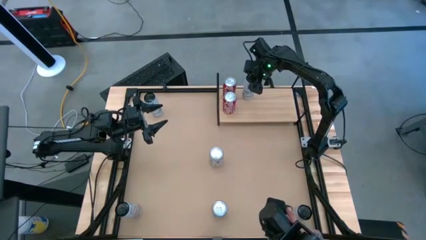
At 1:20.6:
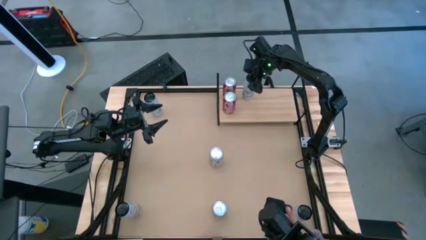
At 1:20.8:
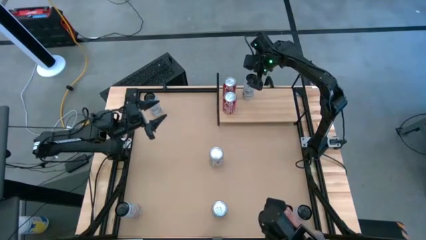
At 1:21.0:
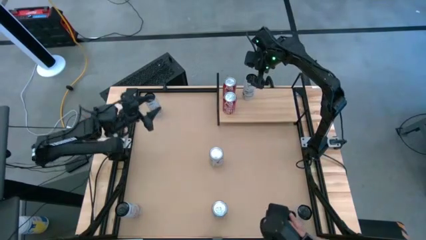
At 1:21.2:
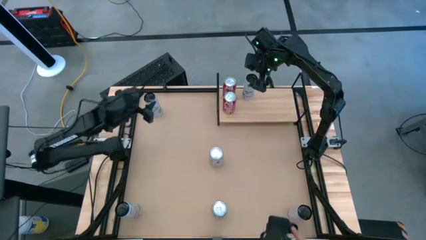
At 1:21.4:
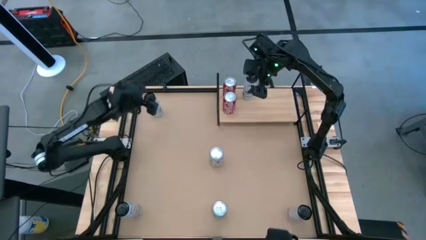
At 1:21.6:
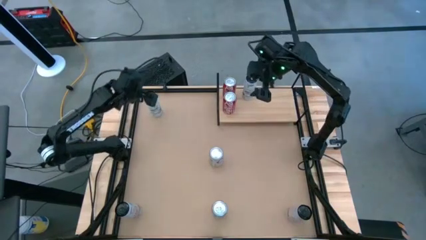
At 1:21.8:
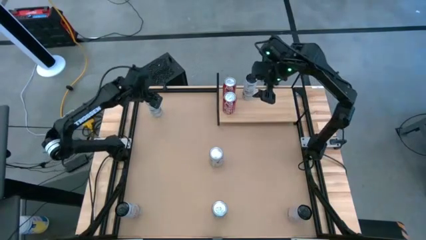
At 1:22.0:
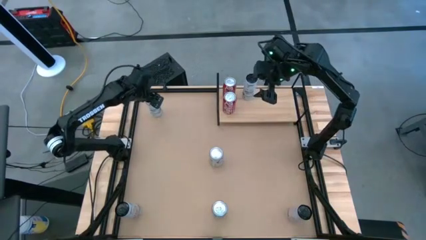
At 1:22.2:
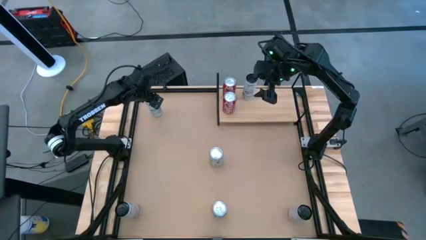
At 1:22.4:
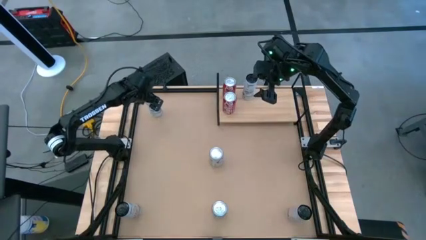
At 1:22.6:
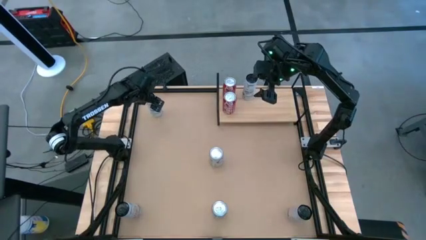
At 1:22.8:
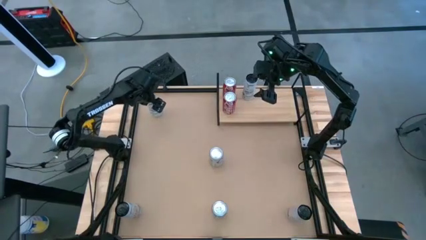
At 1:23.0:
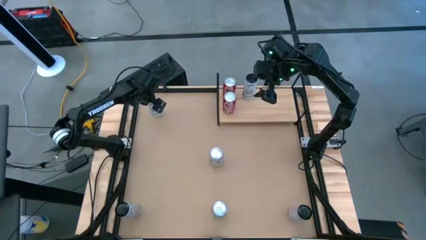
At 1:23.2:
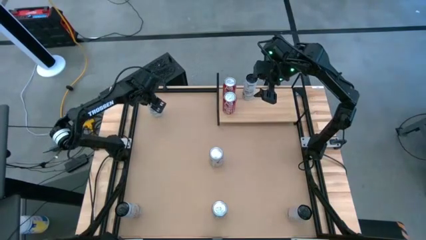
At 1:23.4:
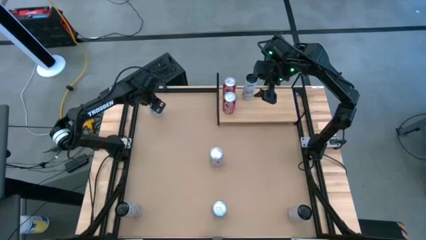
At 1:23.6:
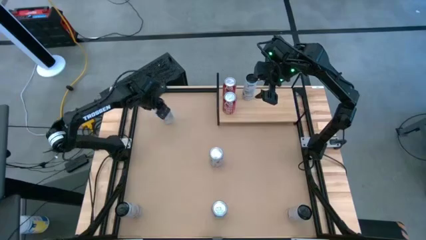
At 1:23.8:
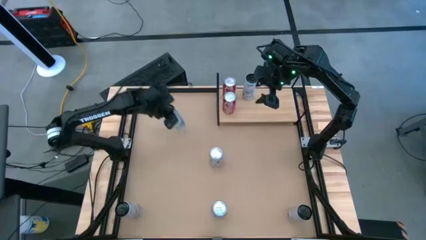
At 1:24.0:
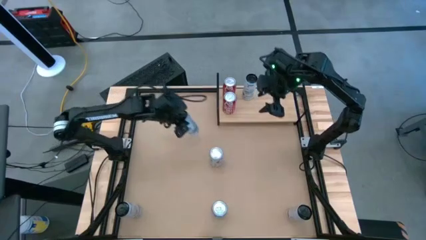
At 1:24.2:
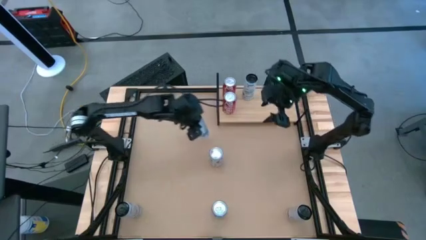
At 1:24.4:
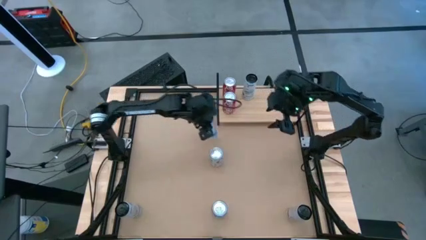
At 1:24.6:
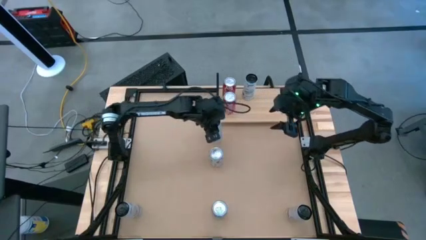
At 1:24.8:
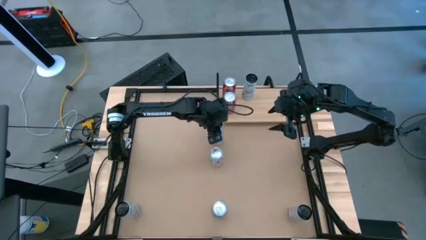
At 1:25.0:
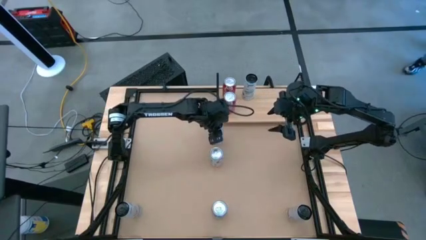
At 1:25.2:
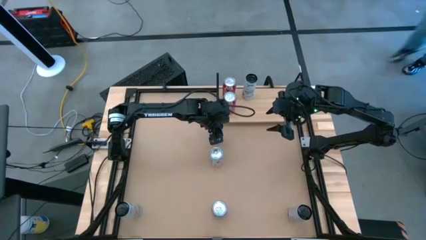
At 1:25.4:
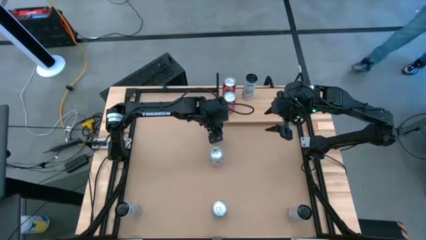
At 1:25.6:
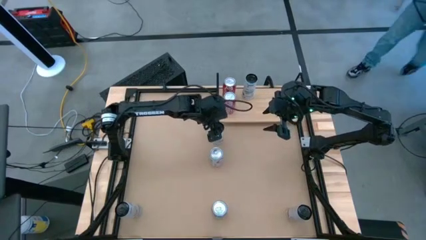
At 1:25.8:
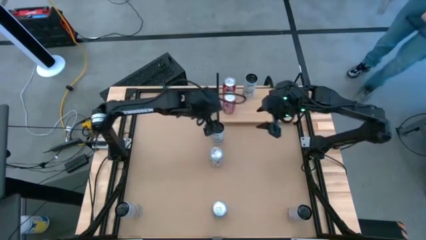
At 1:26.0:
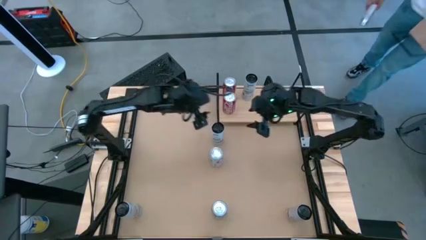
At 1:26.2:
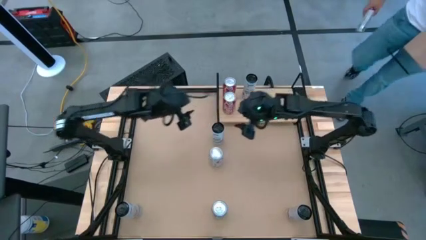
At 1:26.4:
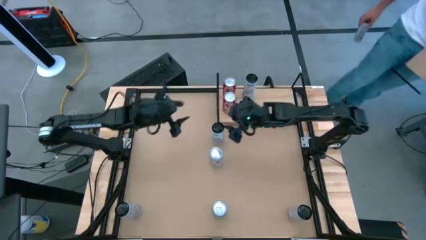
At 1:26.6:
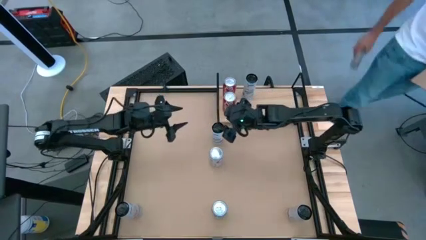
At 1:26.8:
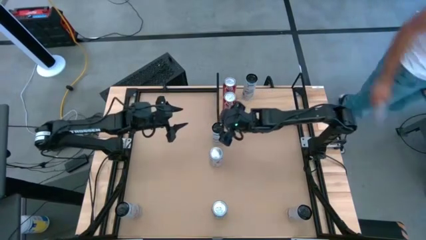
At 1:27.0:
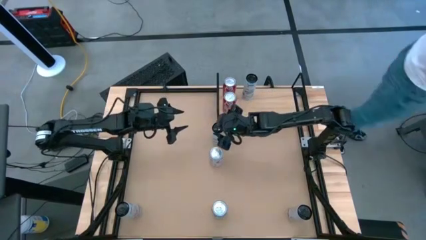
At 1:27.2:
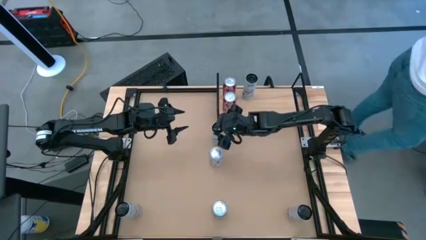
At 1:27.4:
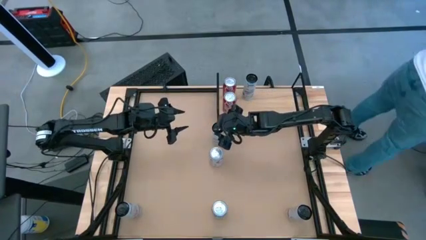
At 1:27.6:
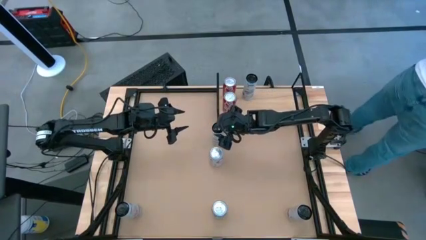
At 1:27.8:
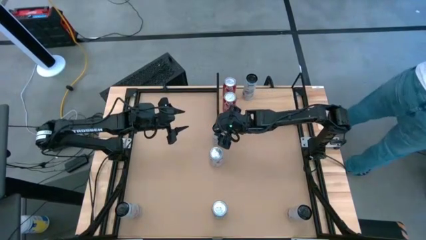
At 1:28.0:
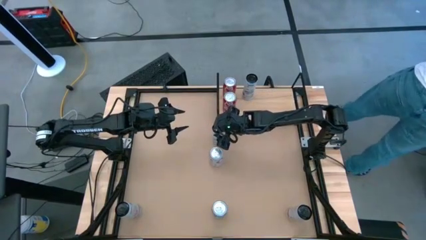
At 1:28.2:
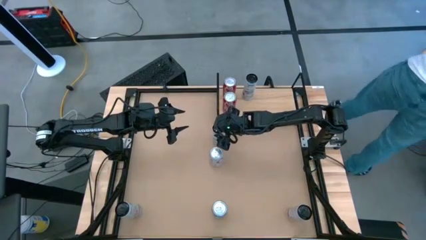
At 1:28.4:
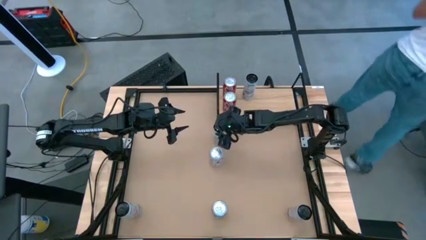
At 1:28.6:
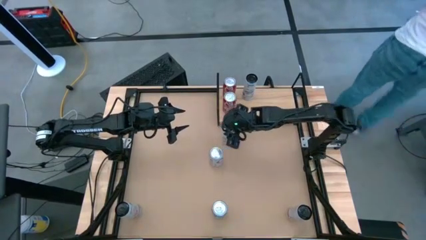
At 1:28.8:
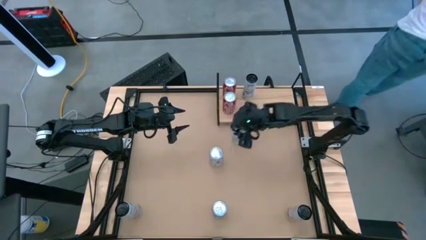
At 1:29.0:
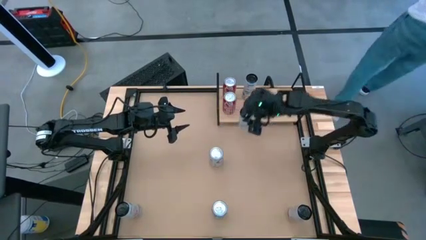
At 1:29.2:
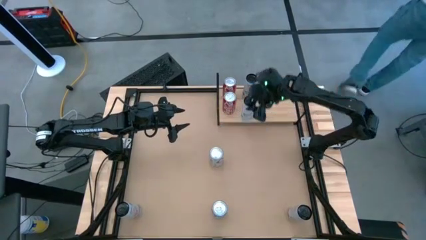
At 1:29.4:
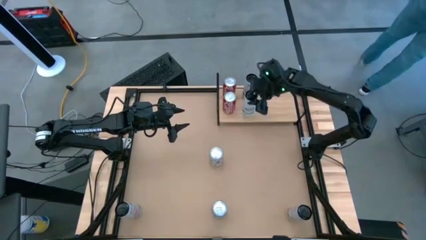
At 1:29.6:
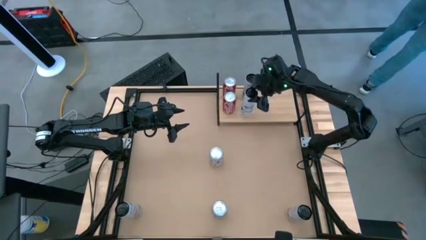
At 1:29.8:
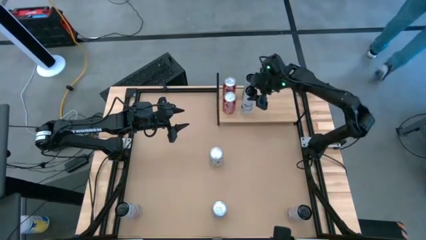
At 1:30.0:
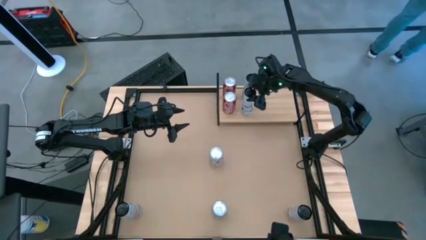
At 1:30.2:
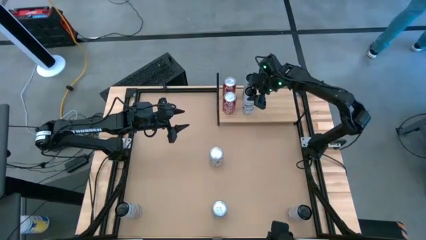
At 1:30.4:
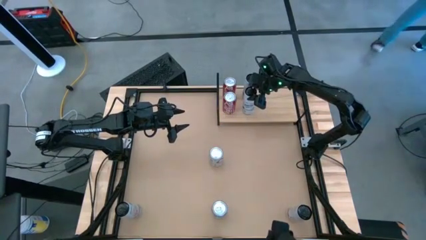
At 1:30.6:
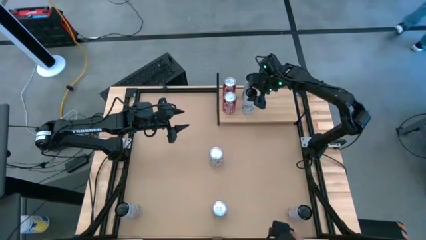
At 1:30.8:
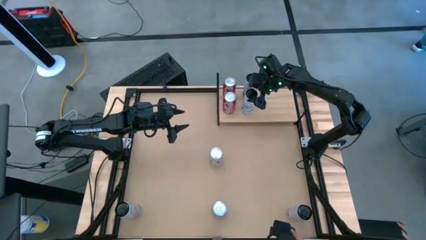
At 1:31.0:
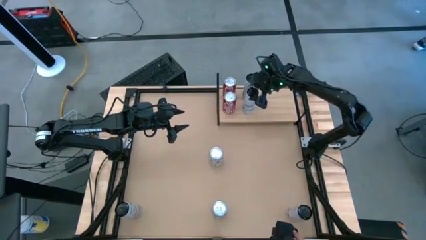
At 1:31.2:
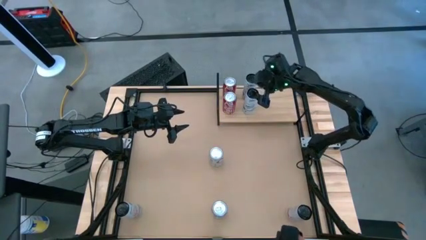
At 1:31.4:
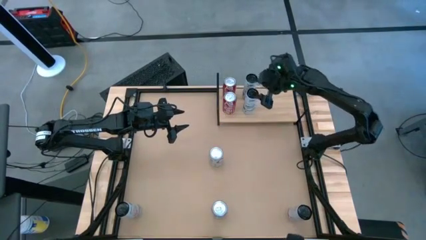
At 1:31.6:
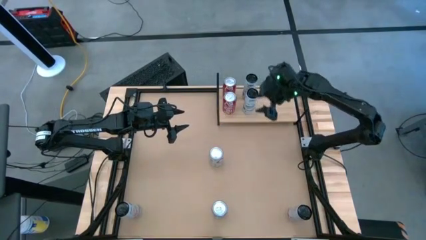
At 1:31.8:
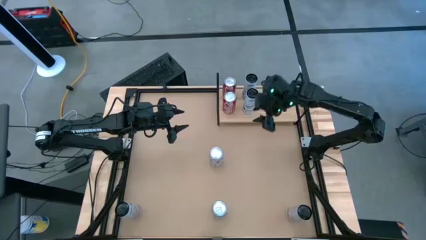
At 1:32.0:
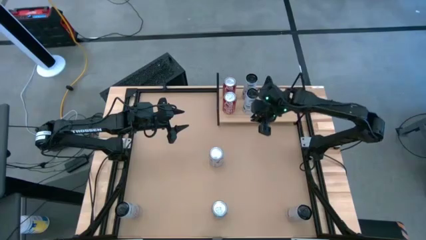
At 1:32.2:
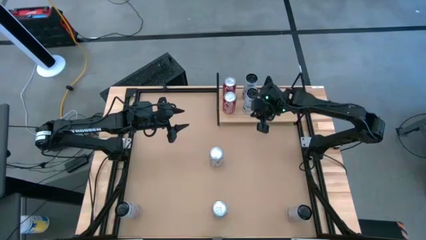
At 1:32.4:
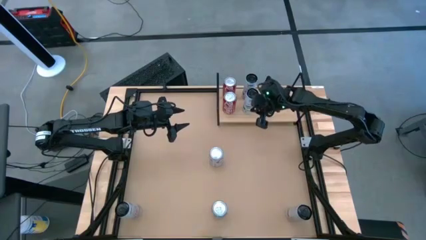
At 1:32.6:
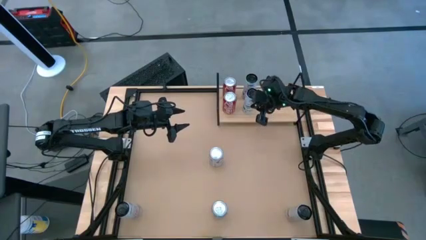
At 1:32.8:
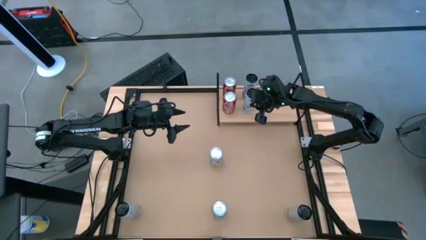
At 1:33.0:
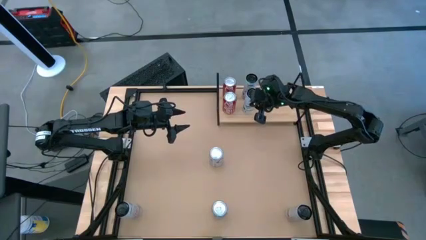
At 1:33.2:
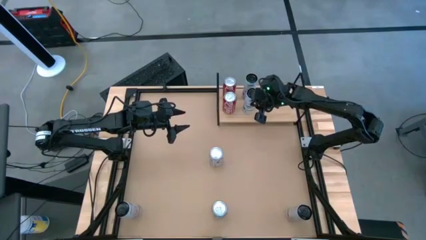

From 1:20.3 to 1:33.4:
Task: Place canned beverage on shelf
Put the blue soda can on the shelf

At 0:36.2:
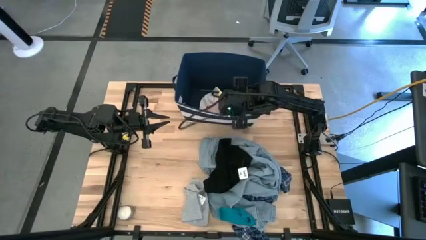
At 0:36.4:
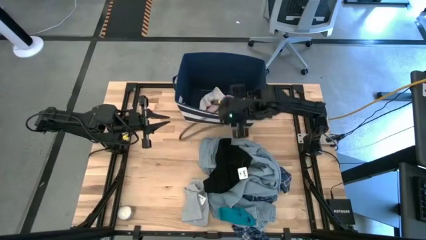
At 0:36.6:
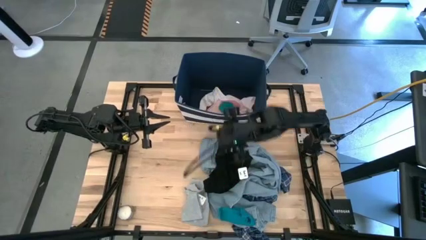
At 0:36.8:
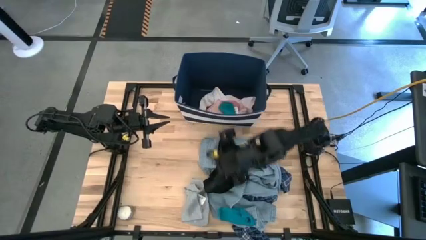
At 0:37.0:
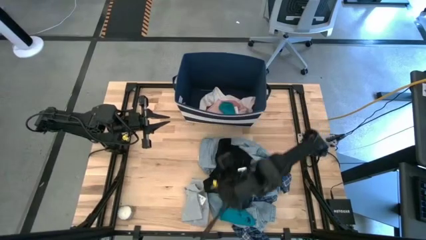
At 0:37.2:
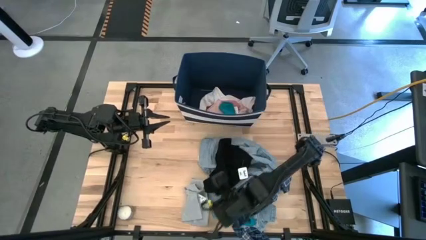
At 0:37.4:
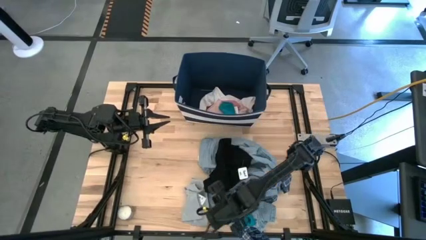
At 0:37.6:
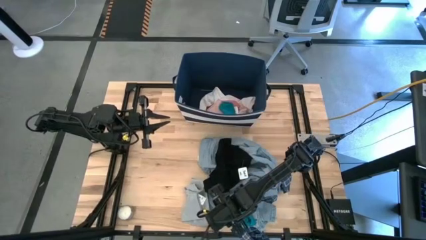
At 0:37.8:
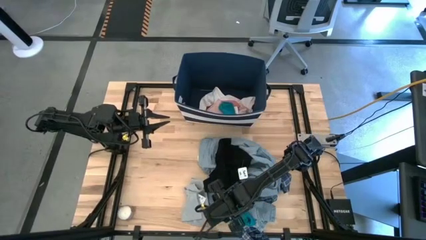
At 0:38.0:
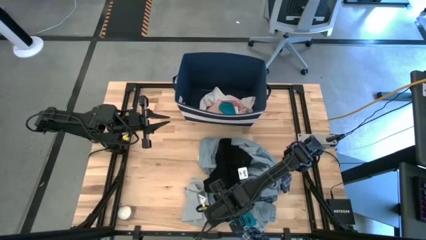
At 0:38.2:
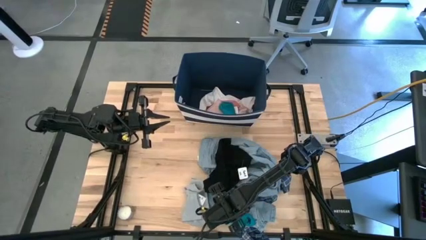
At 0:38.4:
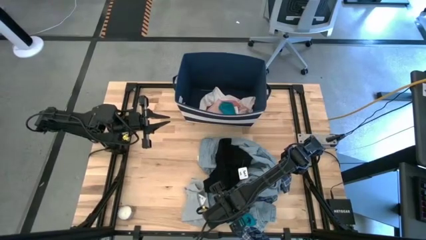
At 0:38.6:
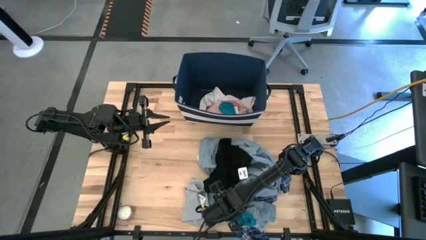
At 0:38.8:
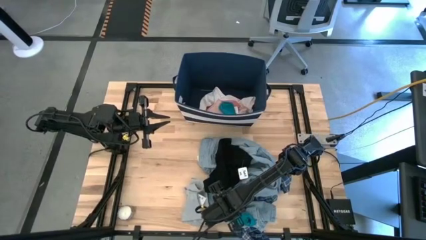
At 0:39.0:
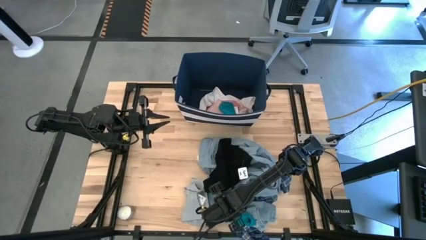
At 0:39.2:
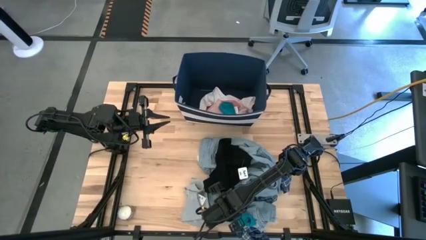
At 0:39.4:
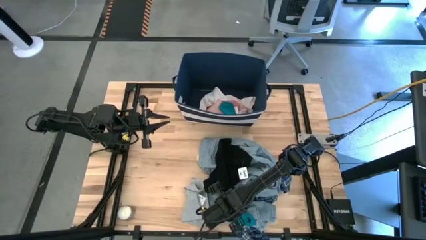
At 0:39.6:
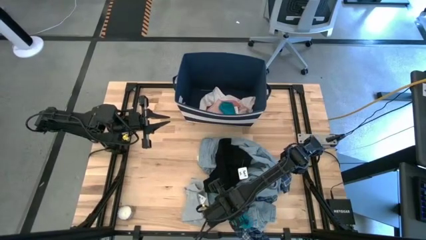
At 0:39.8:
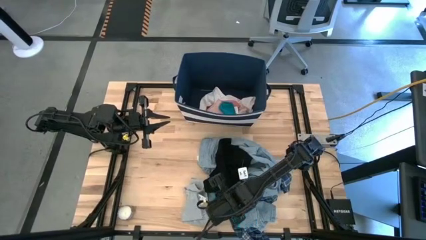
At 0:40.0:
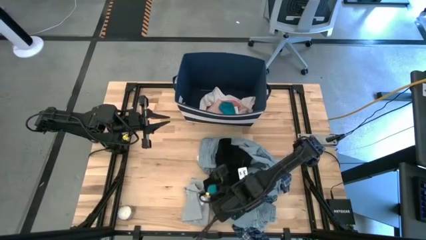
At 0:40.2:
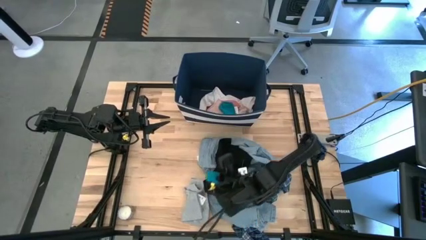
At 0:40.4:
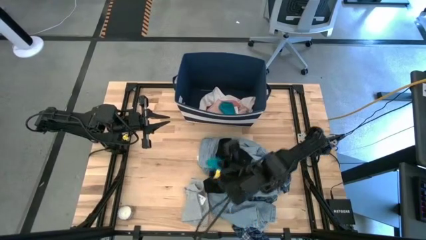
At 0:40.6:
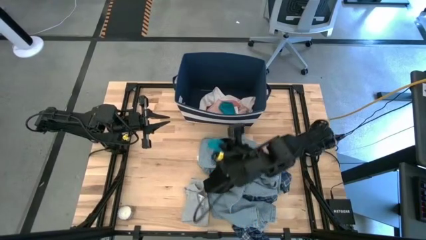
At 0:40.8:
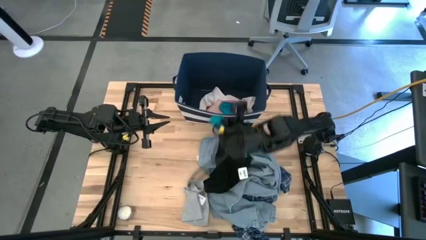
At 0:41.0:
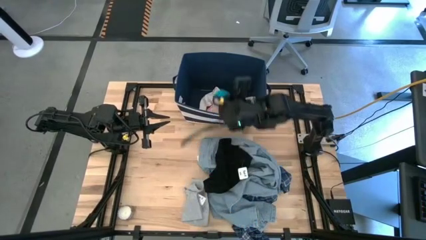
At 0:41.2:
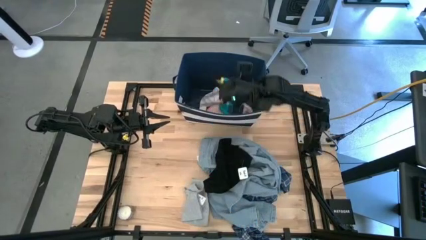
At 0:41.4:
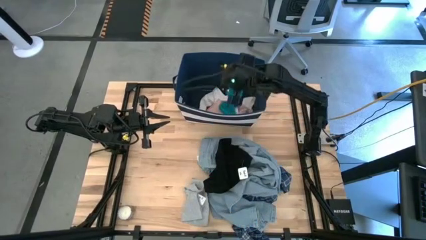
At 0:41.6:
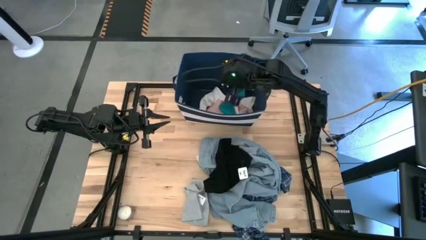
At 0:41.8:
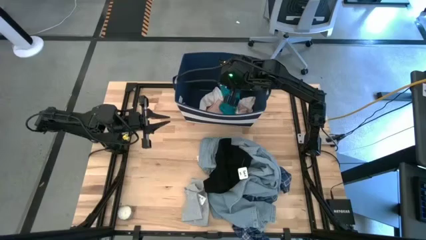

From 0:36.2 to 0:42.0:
Task: Sort clothes
Put the blue sock into the blue bin
